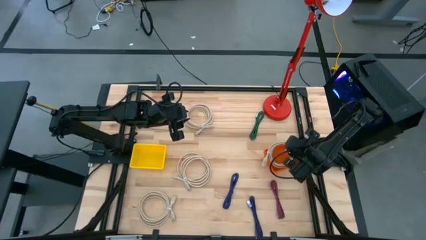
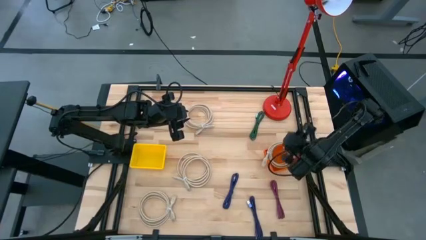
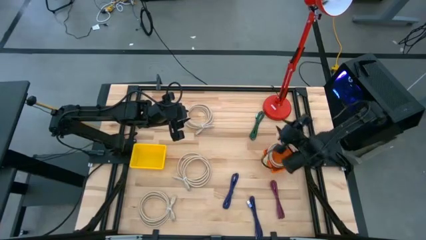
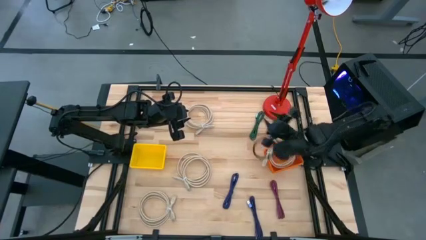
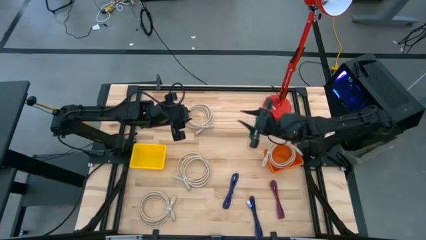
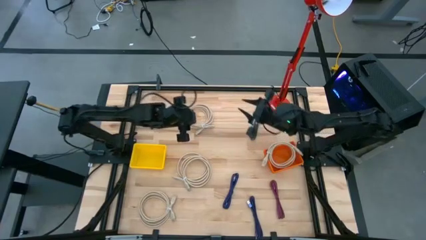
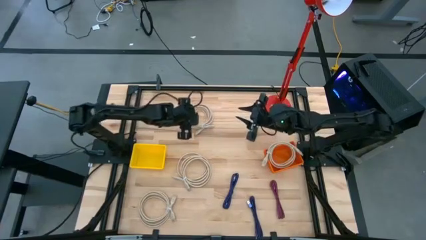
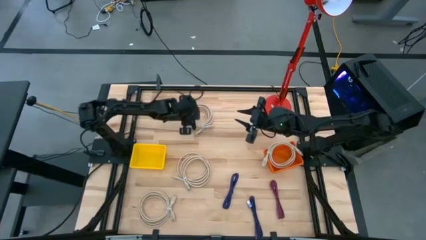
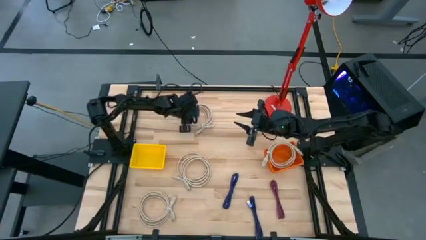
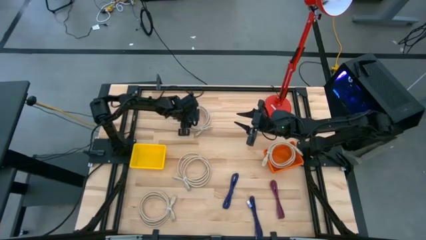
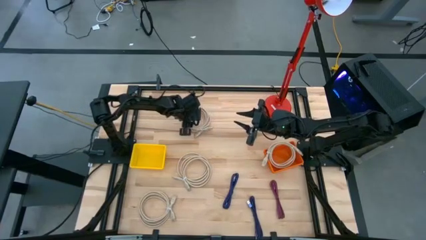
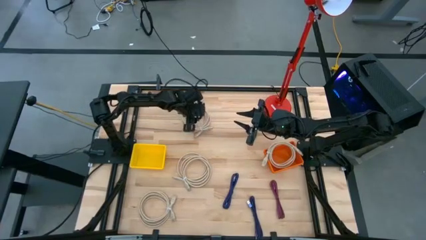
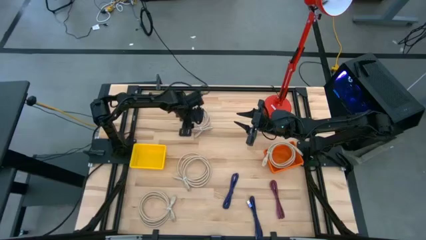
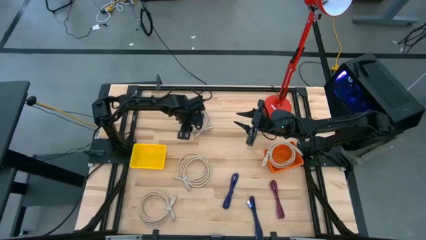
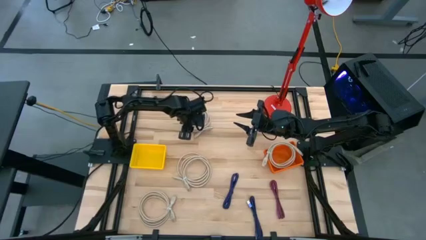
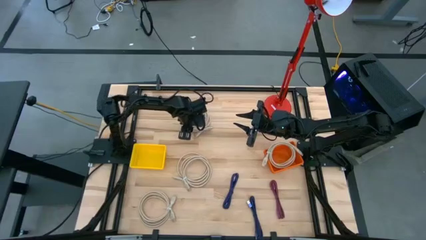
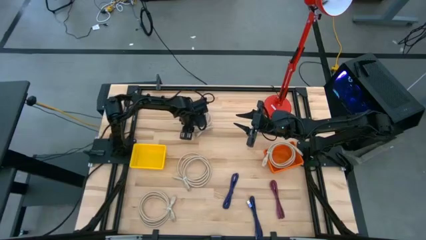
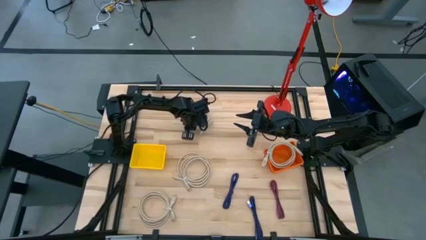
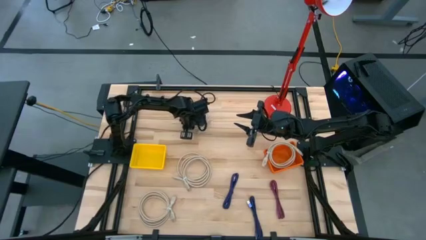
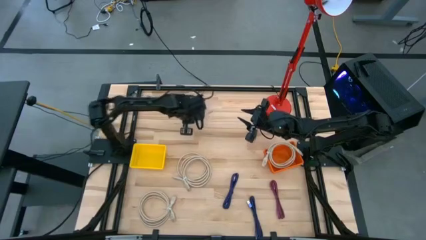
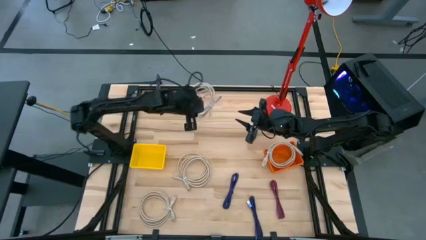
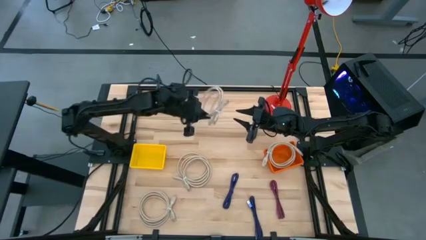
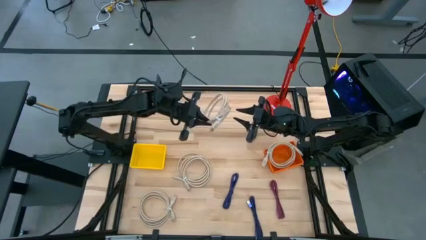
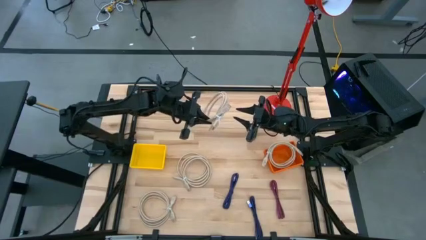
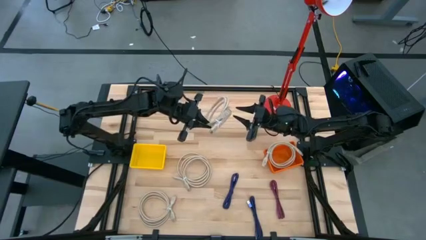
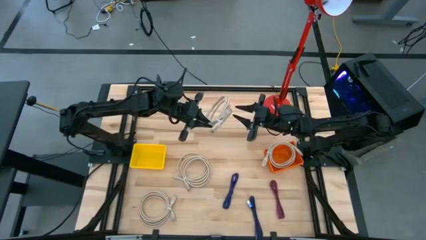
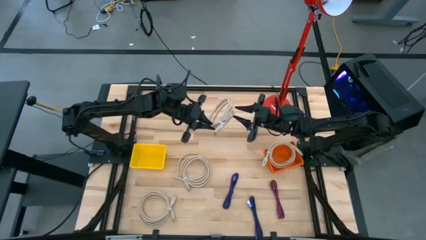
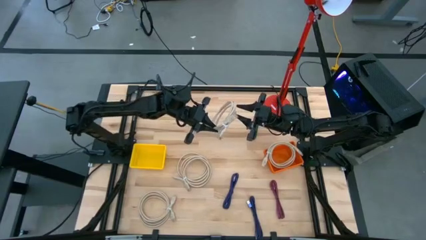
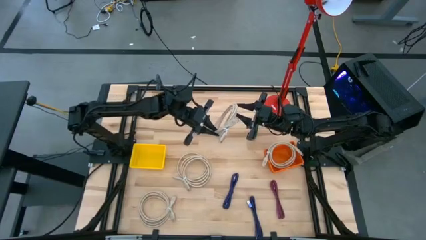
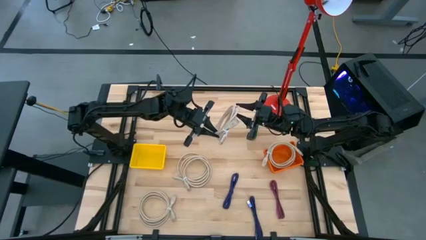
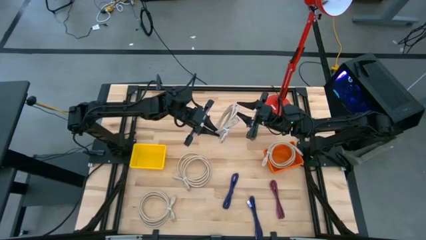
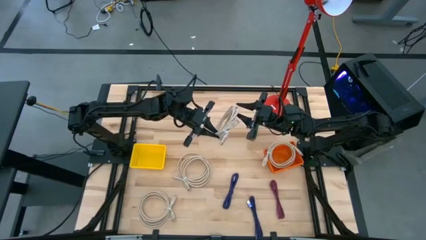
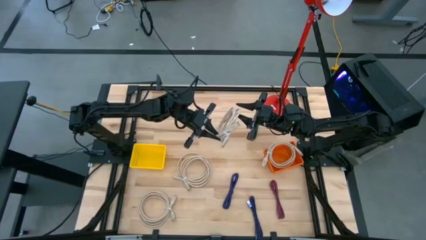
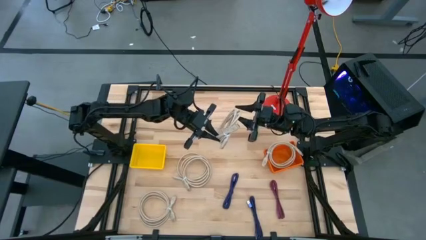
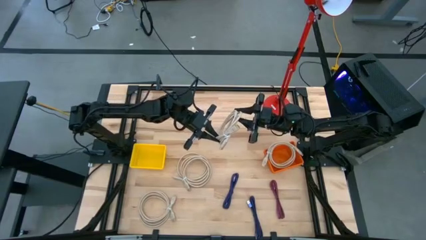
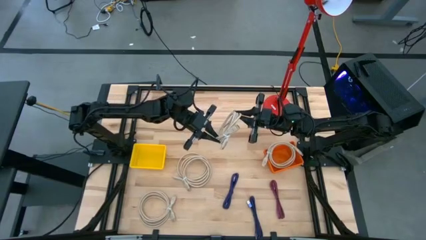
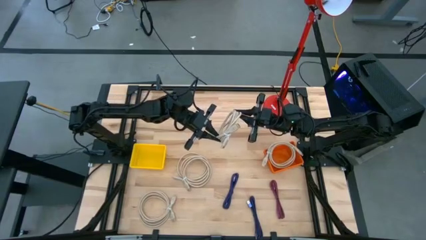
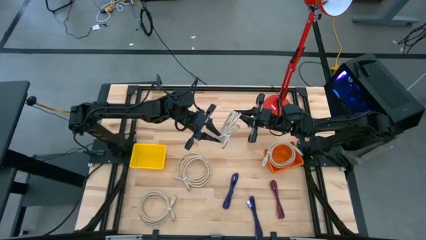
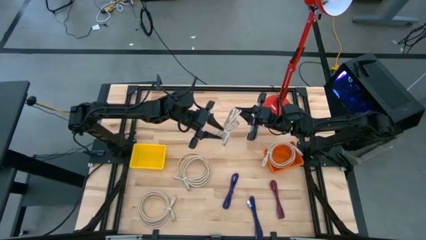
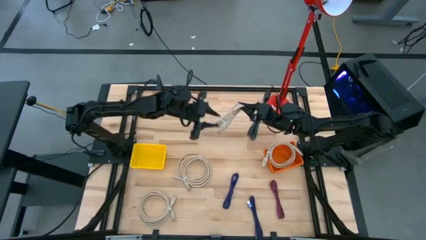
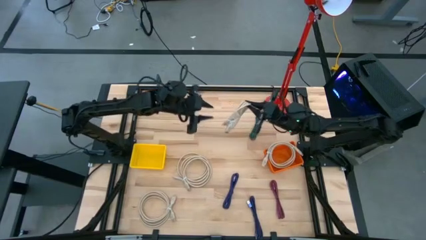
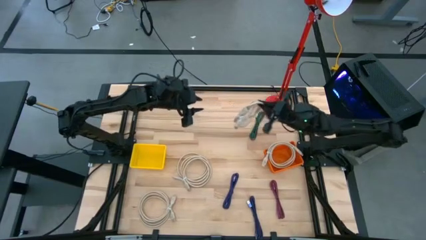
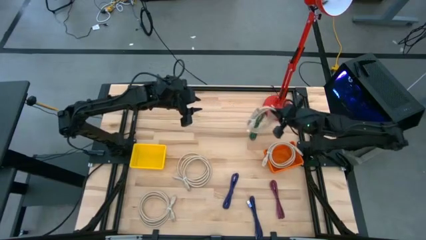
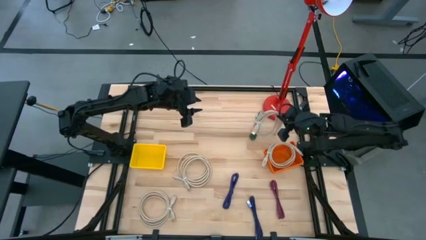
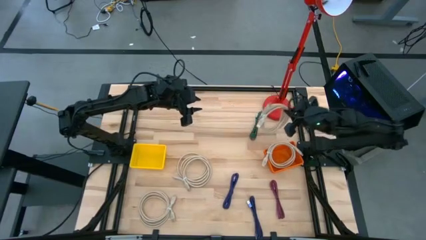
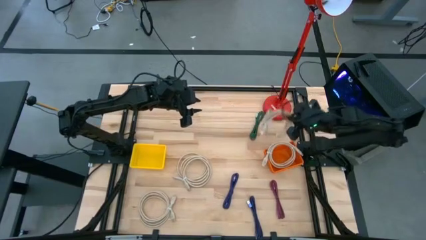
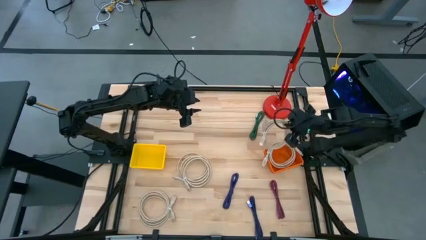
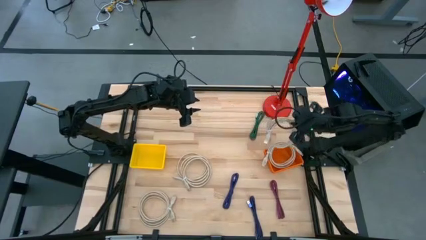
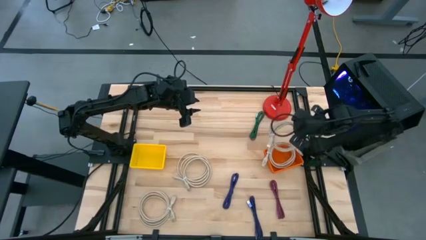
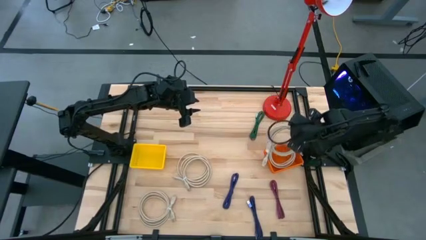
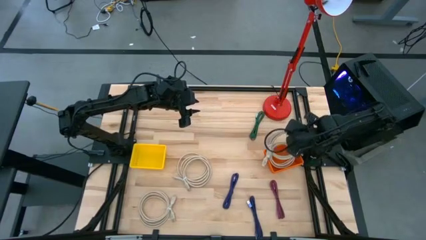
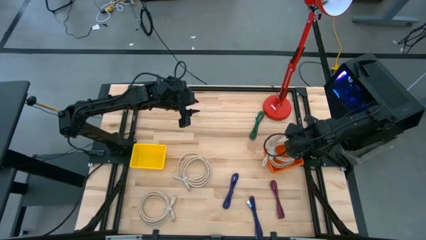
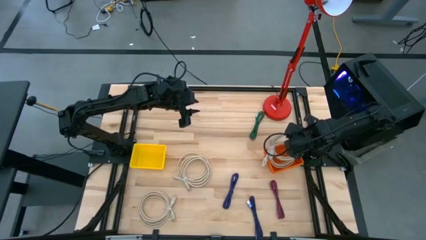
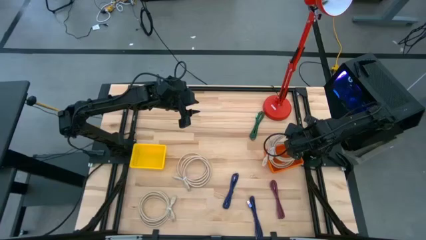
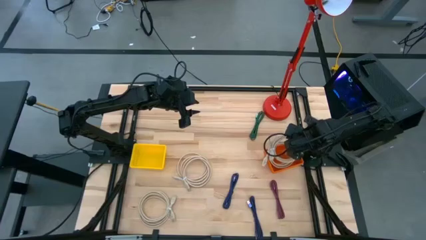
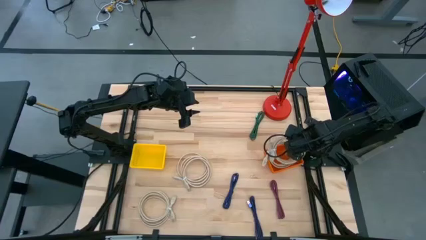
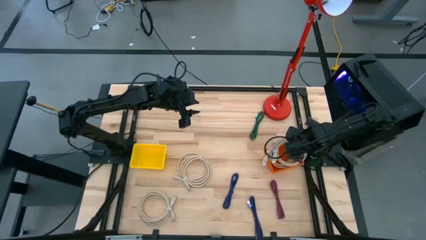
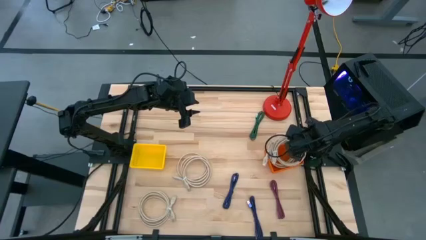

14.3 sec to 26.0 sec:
Task: Pick & Place USB Port
Put the brown HDMI cable into the orange bin

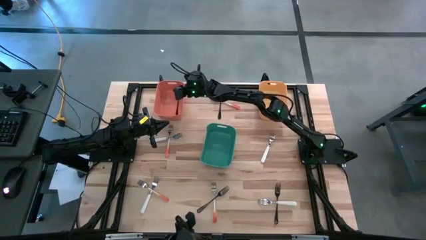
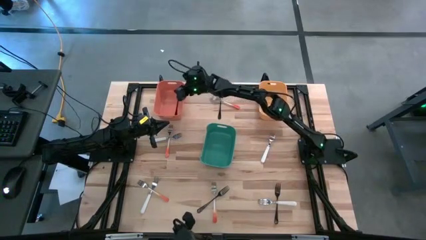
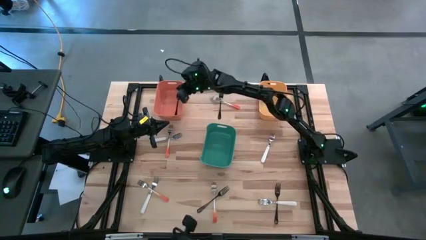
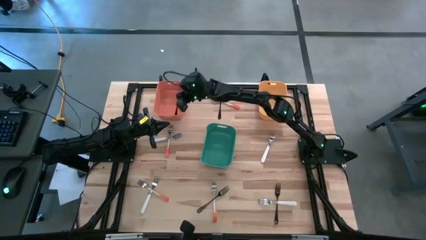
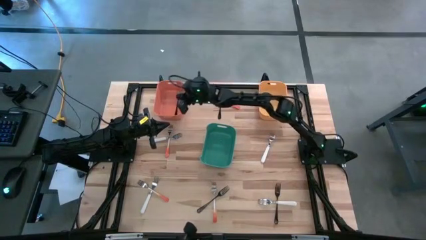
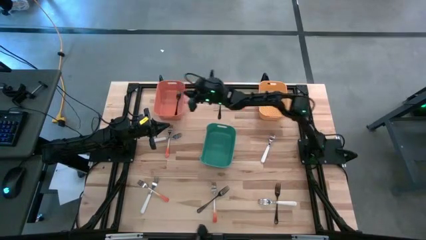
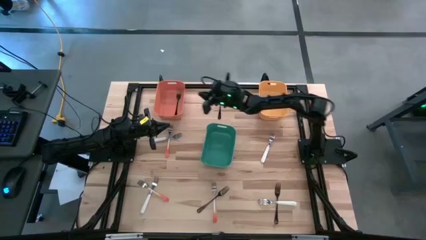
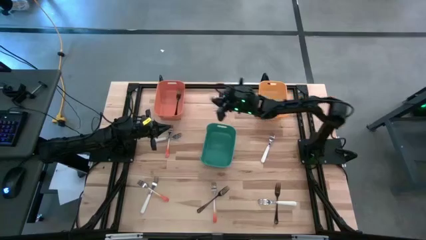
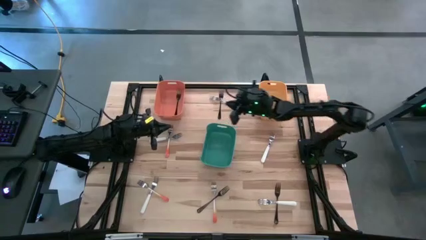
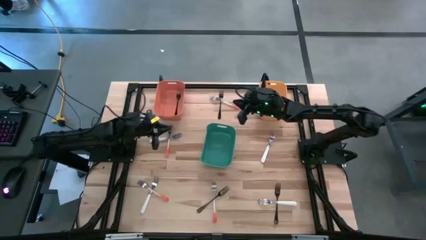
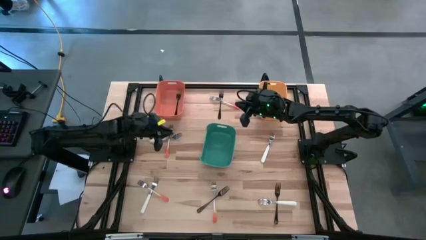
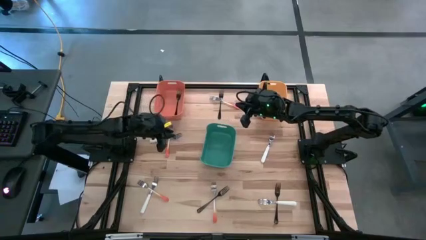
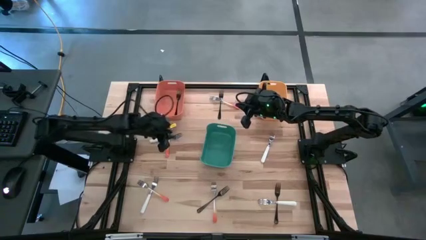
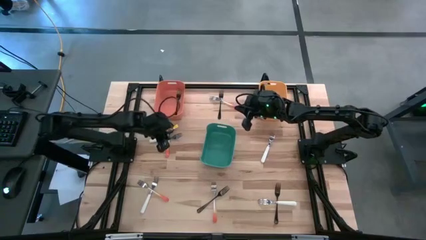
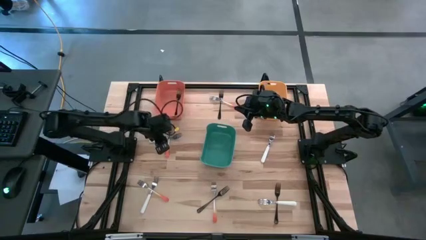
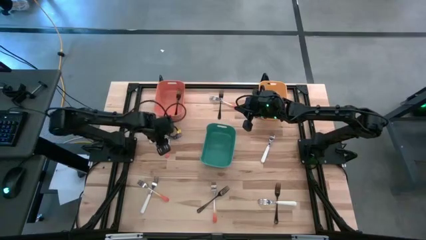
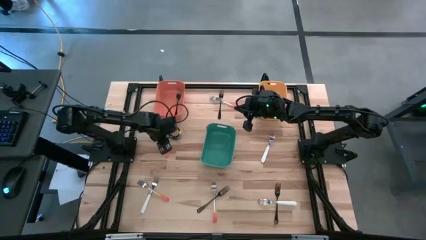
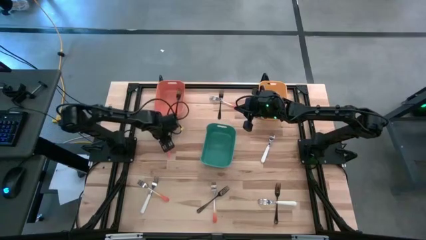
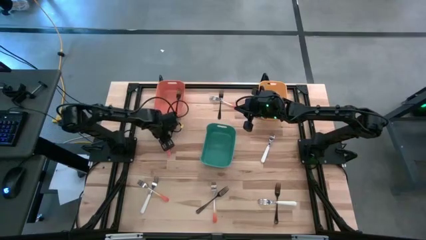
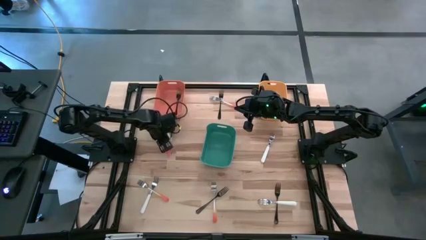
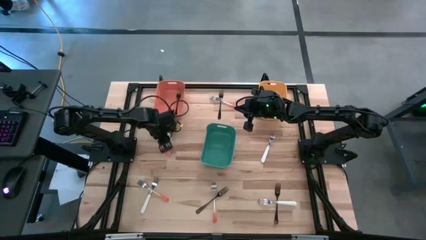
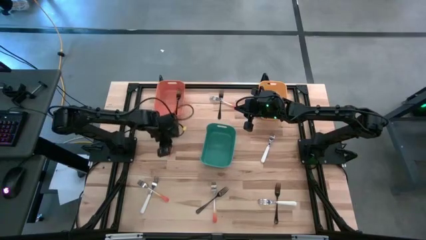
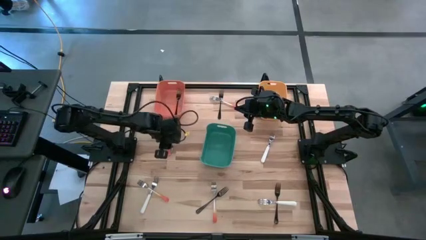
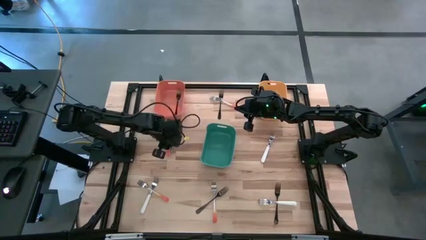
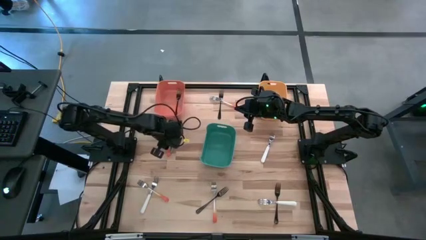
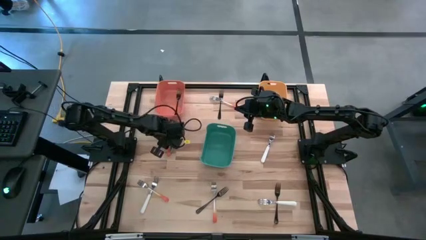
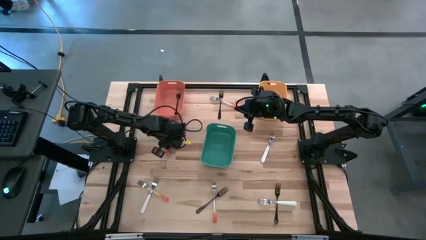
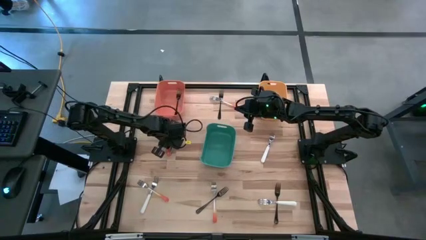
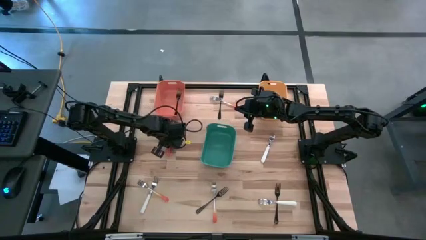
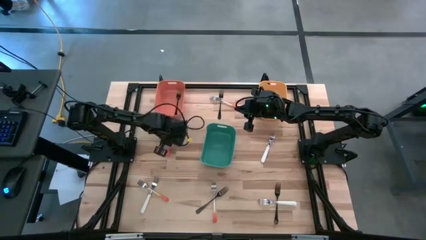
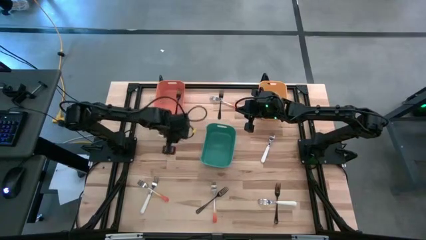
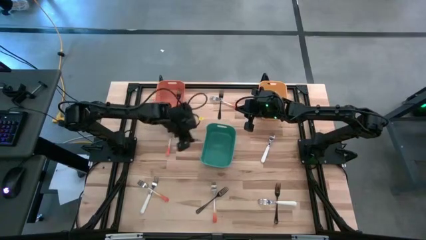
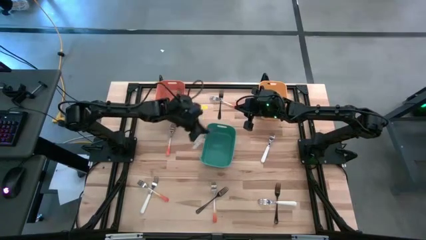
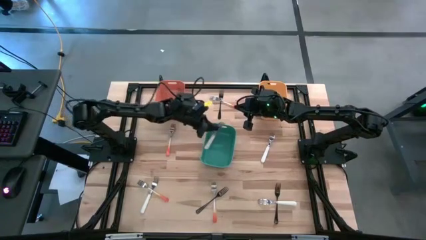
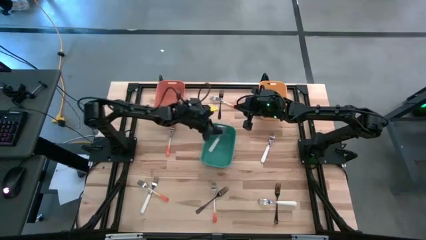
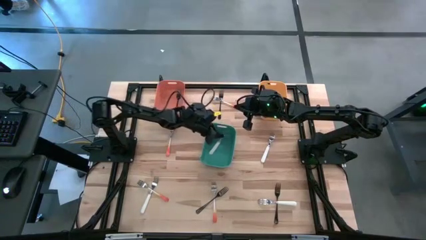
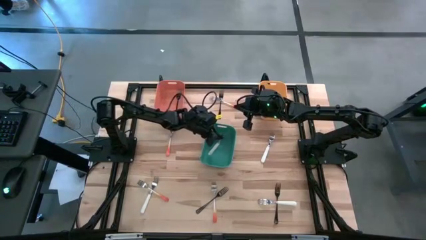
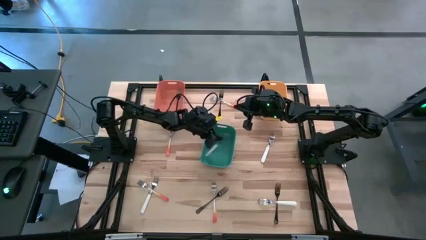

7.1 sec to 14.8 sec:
Task: Sort silverware by color (type)
Put the top left white fork into the green bin
